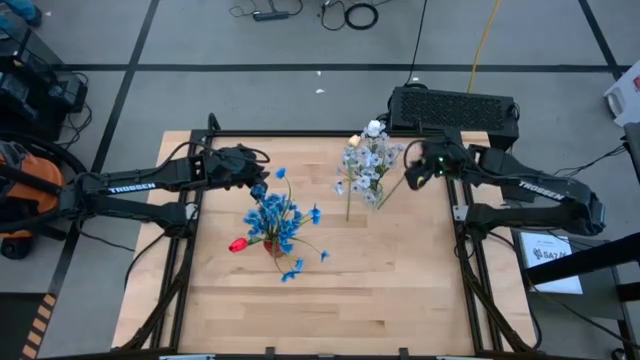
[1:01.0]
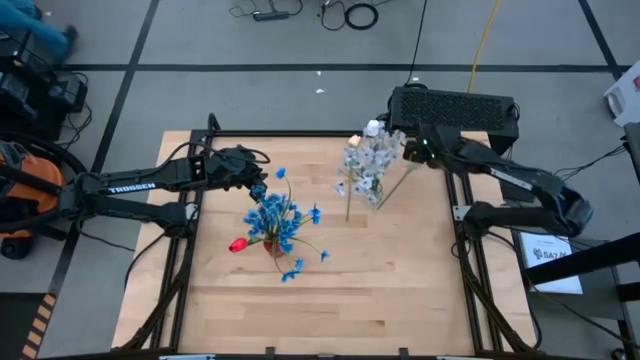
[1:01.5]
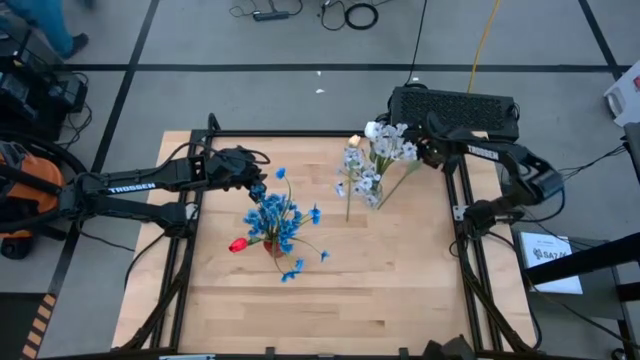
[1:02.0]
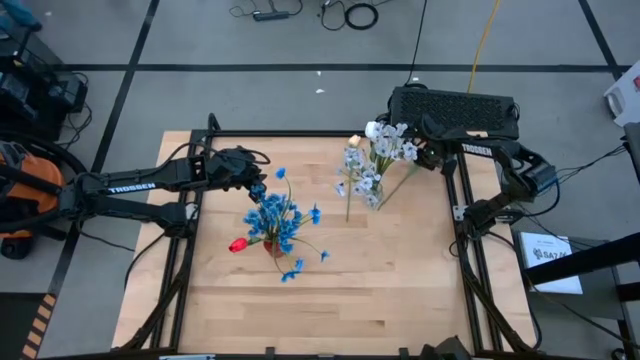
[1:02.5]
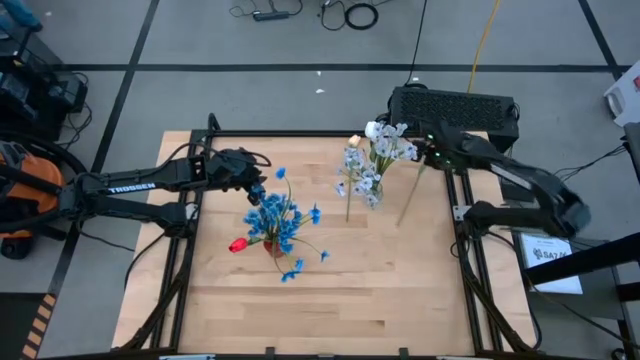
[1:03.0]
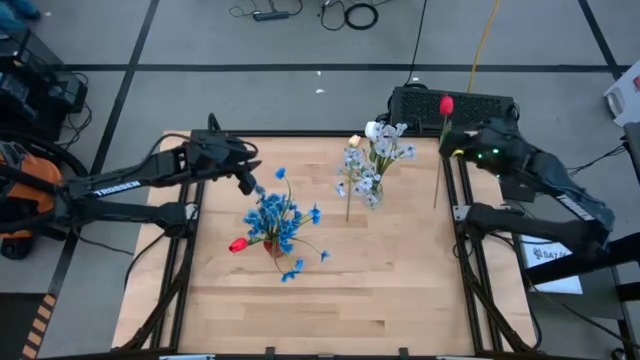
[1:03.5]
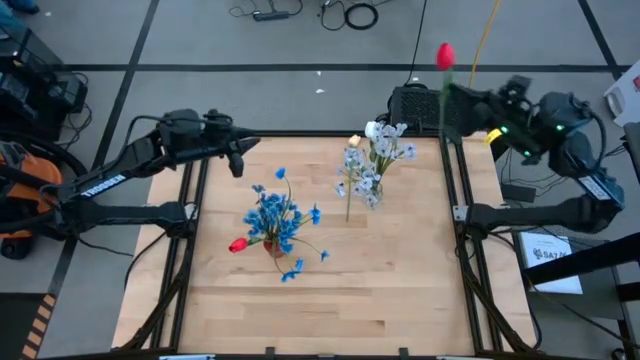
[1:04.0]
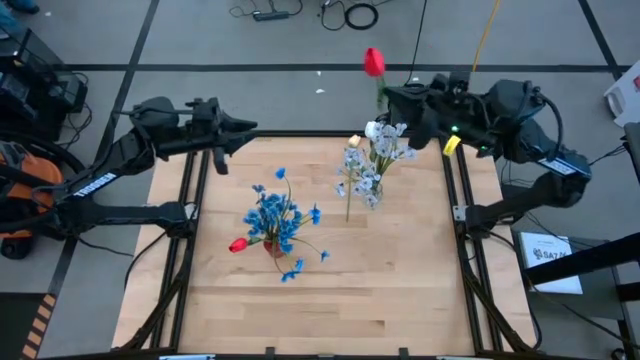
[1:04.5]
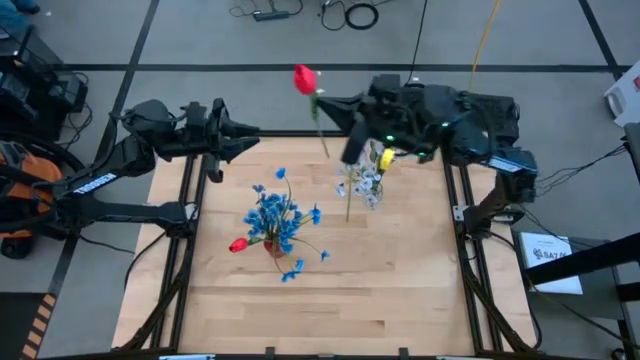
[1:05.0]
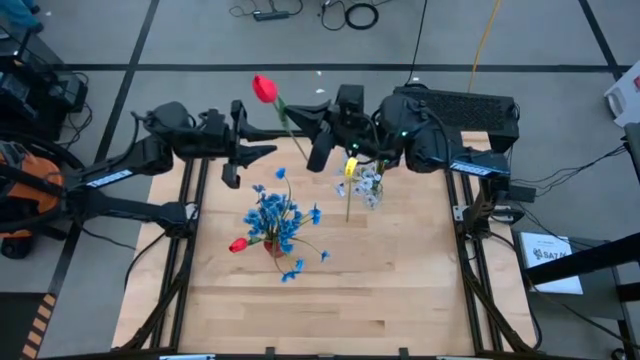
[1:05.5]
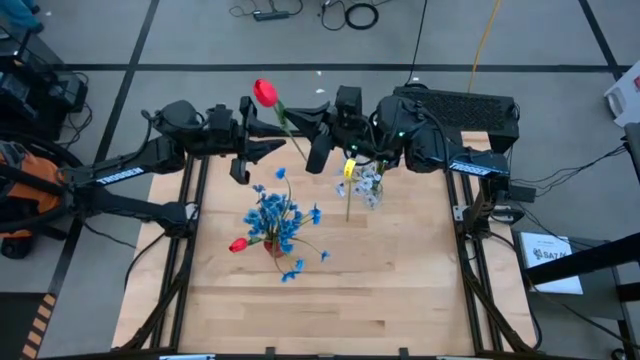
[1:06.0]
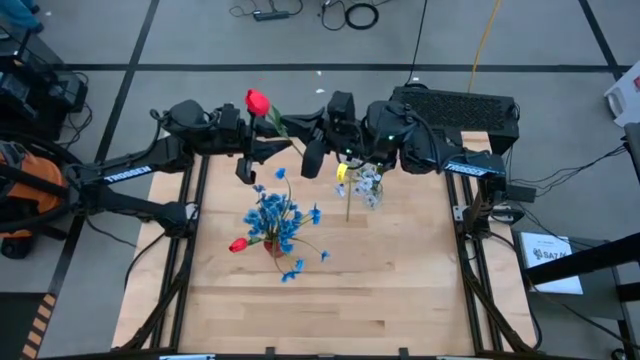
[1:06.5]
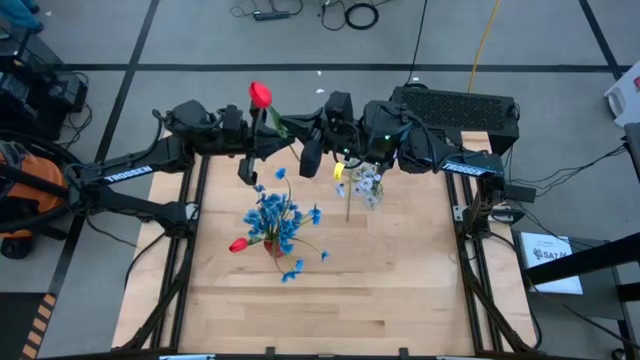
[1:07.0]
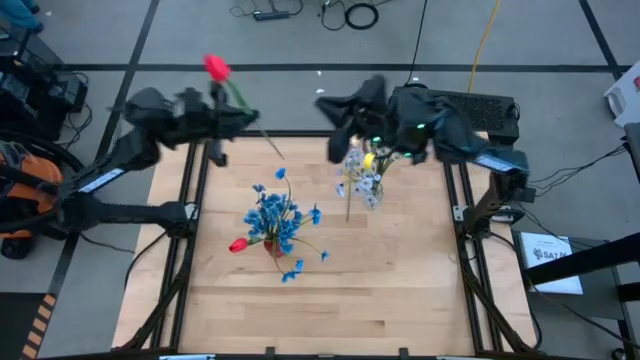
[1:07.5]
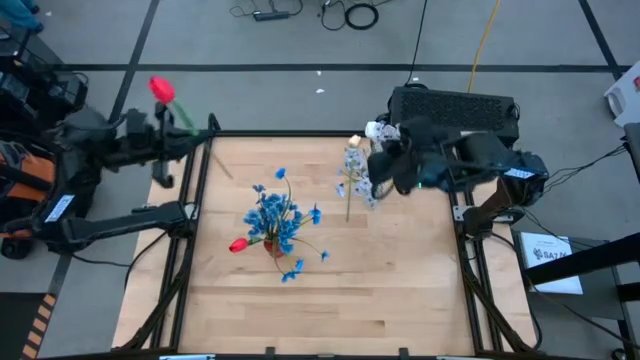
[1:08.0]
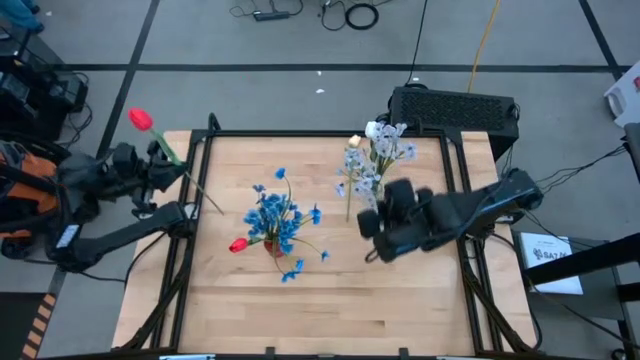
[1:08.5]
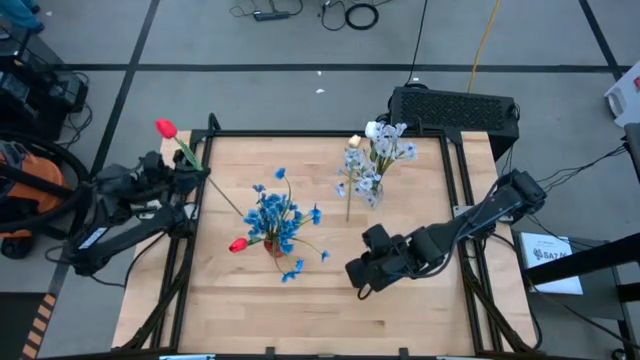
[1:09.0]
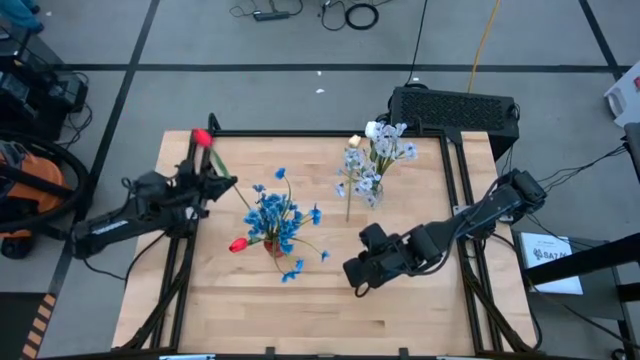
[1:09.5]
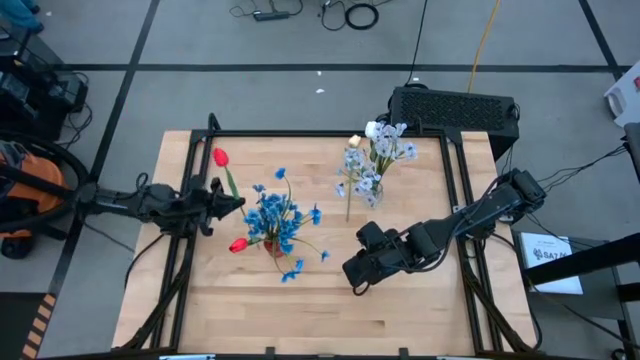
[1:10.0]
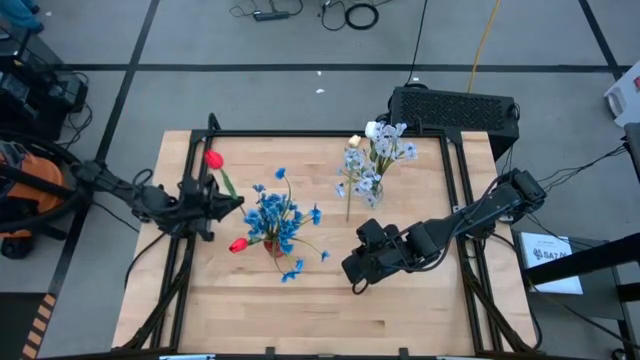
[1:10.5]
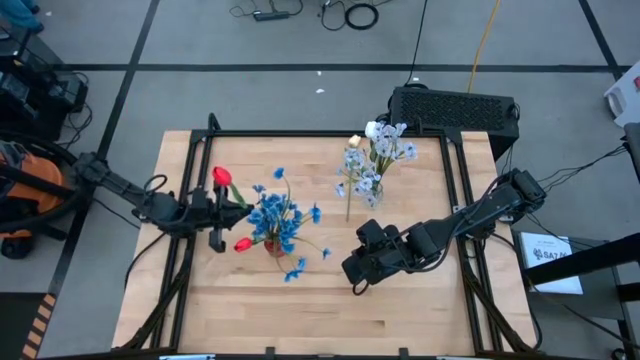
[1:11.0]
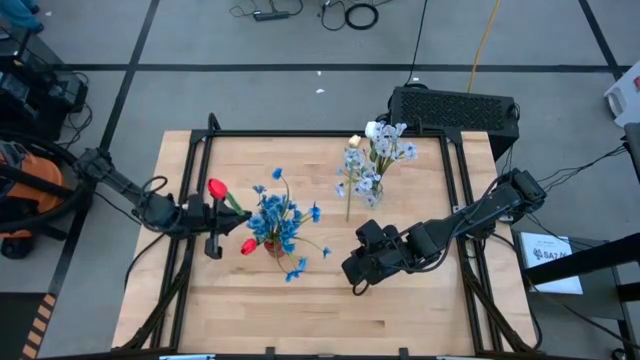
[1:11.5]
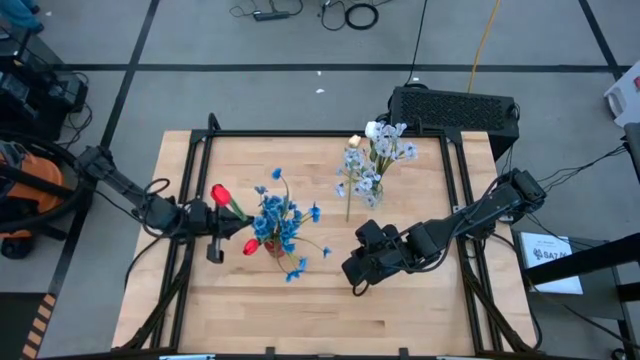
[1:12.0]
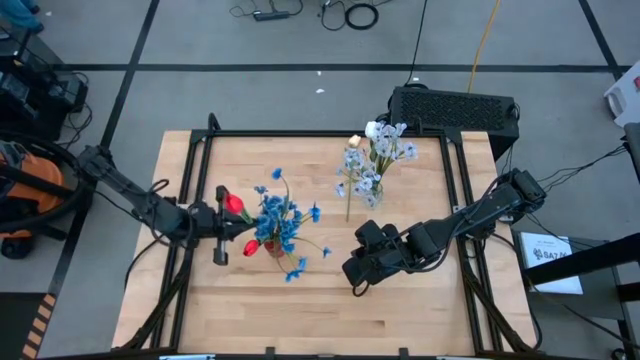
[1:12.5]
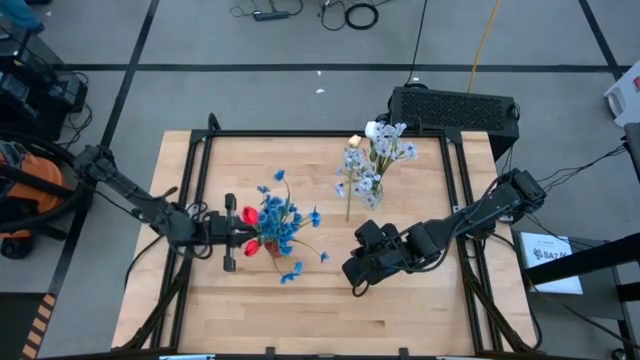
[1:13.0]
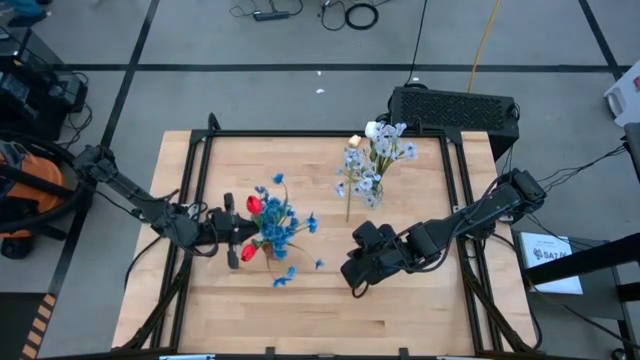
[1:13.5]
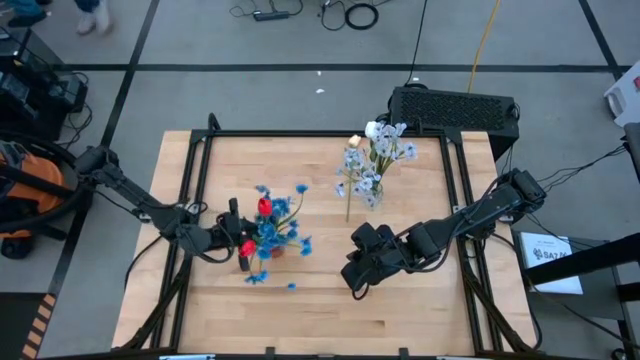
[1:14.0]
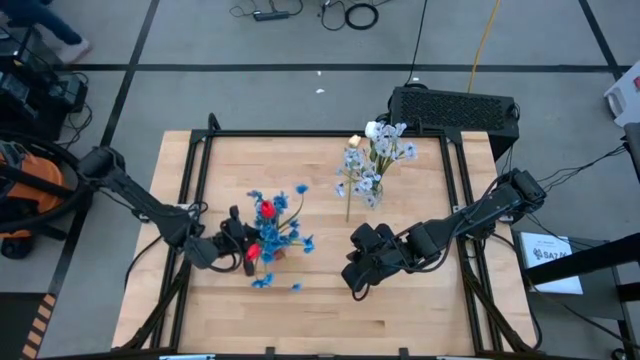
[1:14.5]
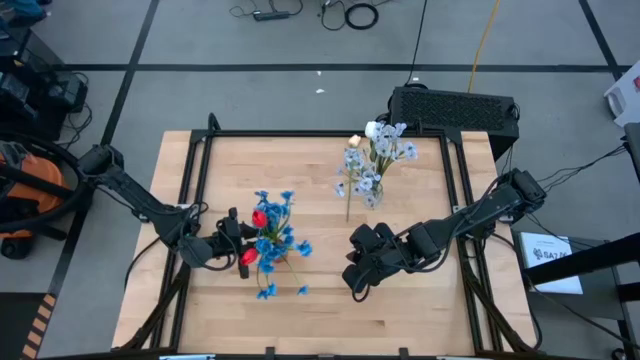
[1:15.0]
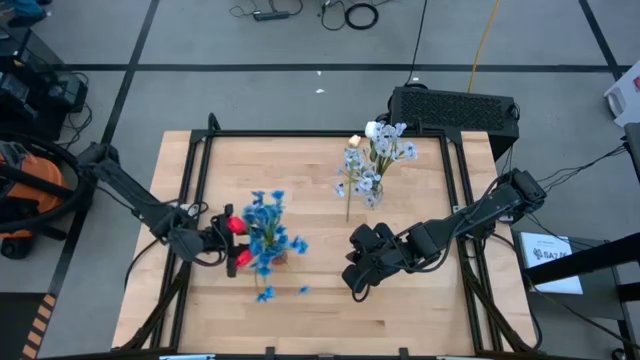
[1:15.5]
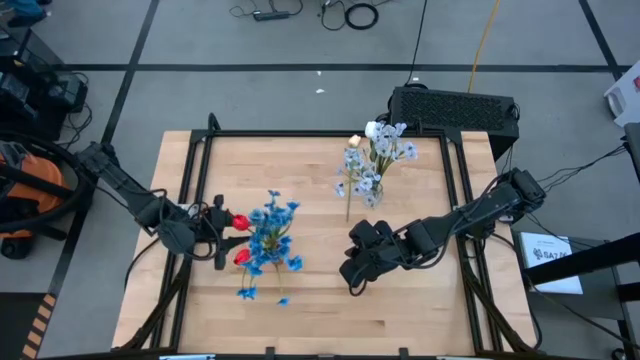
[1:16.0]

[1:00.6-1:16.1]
Task: Sort flowers into vase by color
Put the red tulip into the red vase

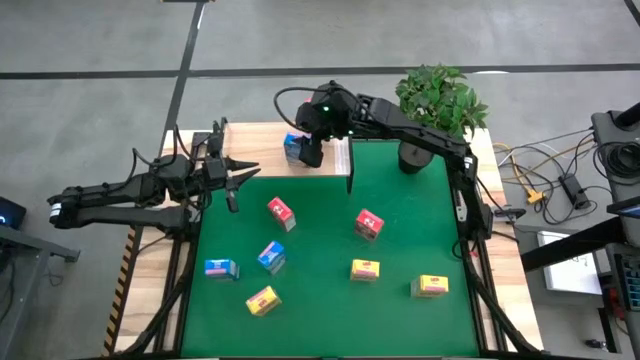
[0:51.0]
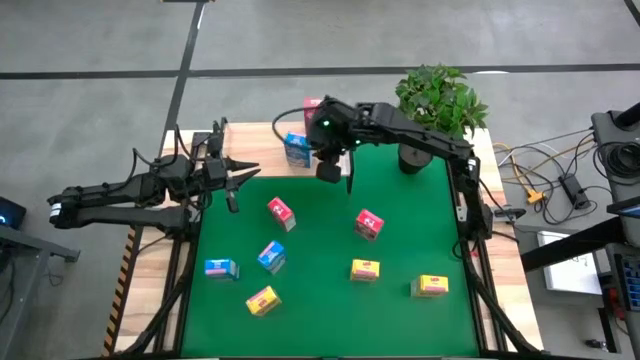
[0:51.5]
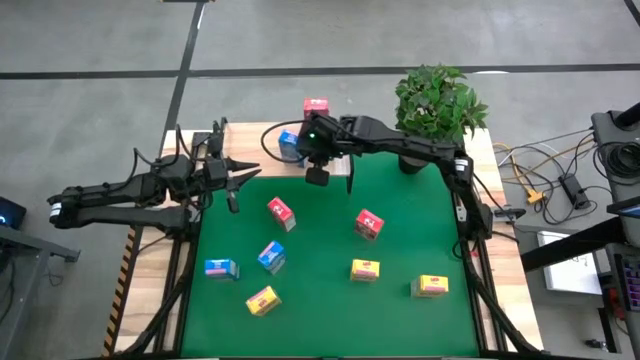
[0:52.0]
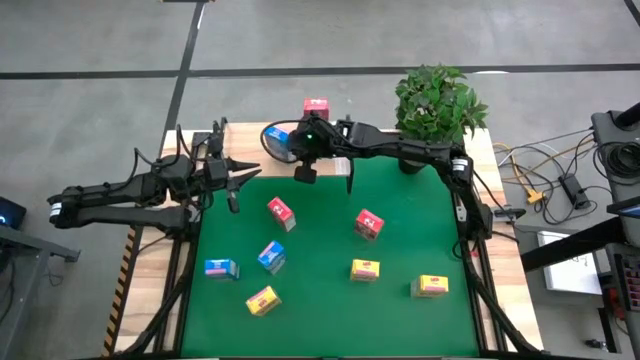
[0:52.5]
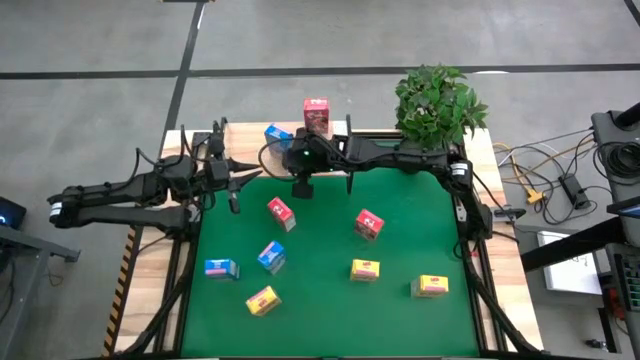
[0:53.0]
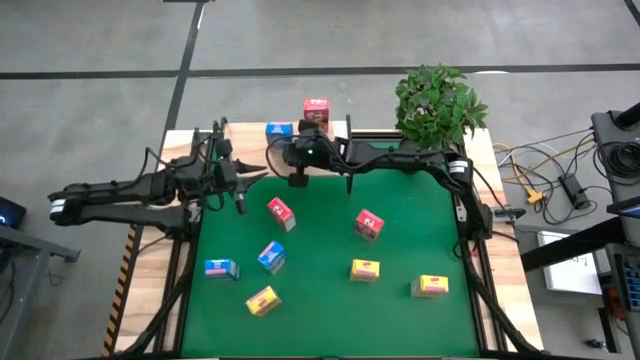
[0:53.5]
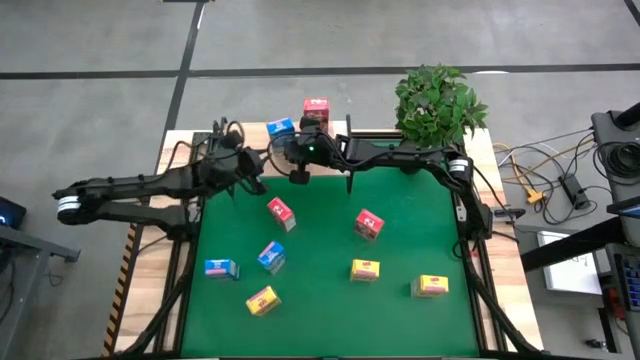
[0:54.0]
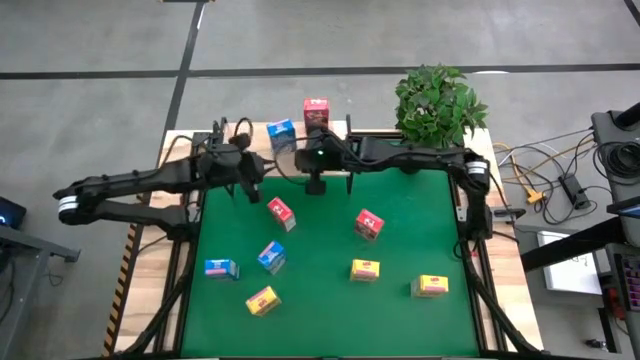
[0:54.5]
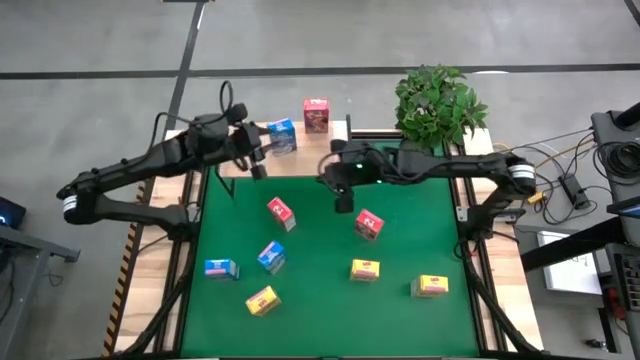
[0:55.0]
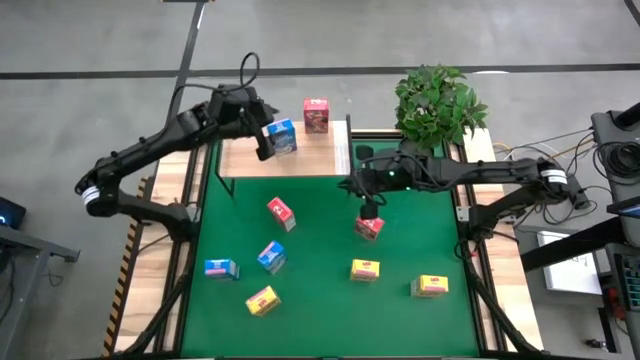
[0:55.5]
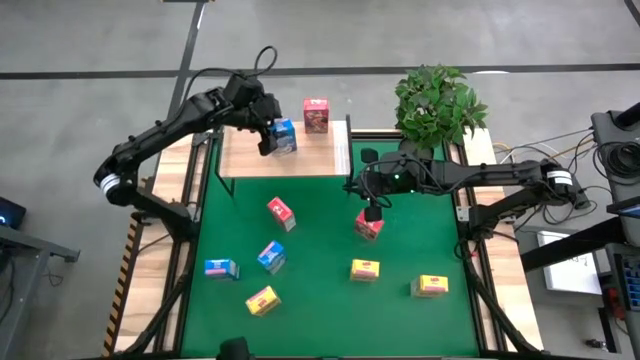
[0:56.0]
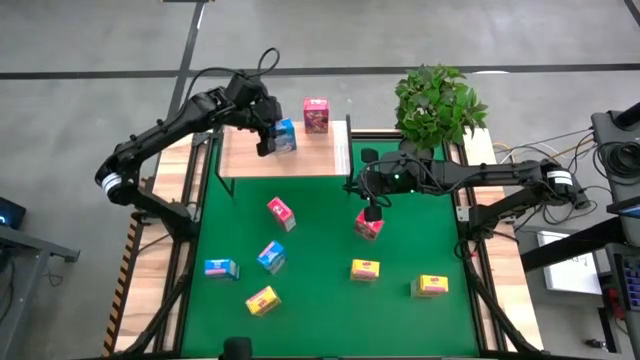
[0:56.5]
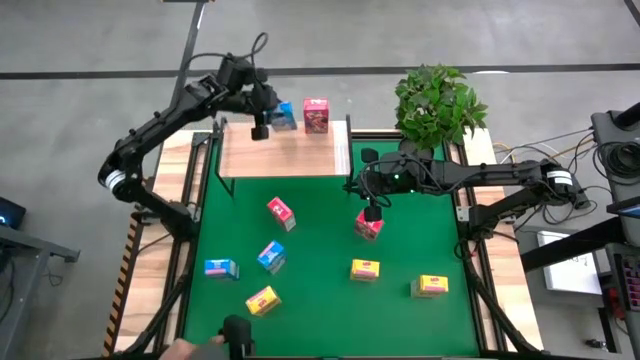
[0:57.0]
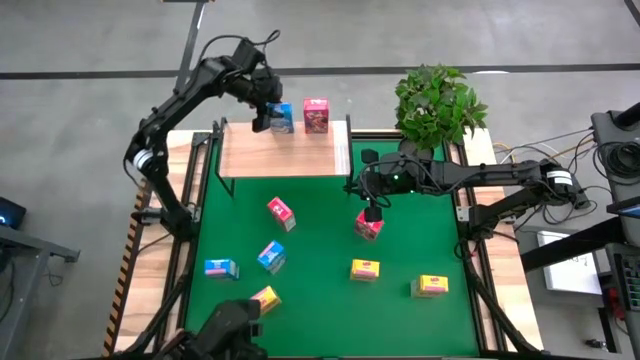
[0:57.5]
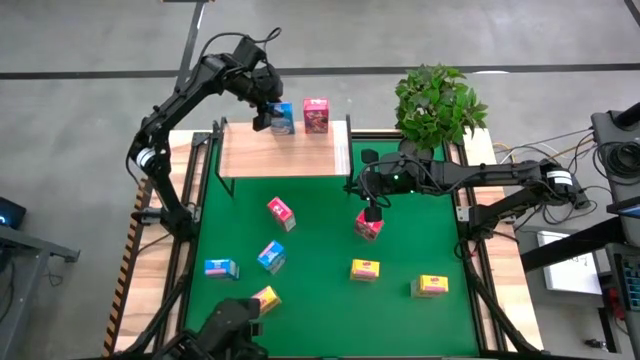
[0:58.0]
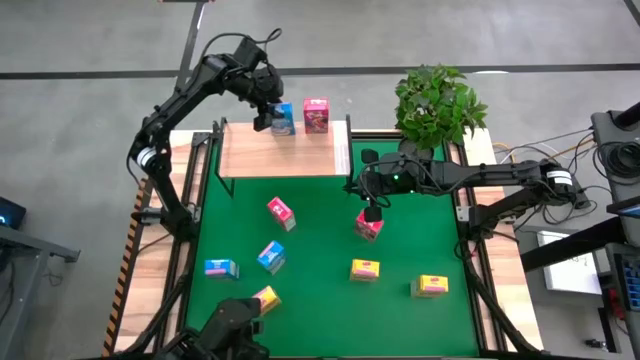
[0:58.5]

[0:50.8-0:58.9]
Task: Stack cereal on shelf
Adjust the blue cereal on the shelf
